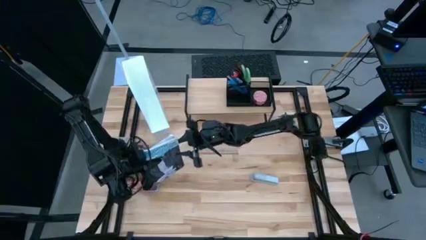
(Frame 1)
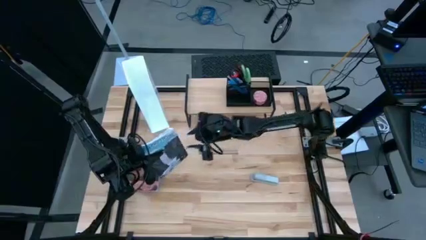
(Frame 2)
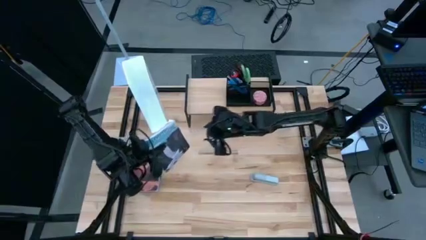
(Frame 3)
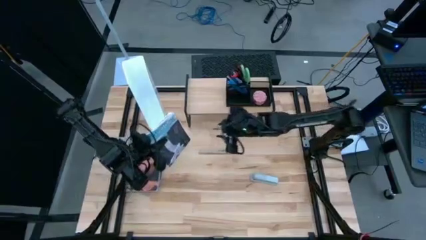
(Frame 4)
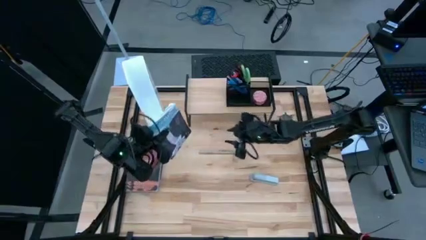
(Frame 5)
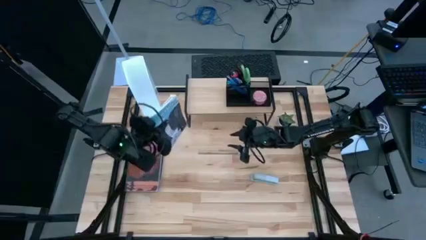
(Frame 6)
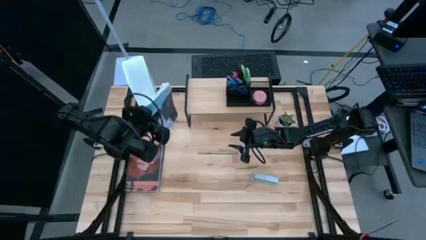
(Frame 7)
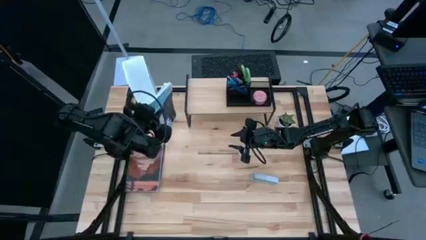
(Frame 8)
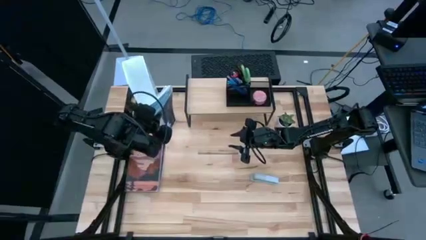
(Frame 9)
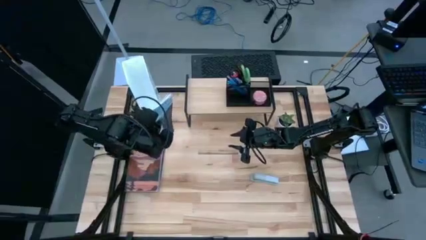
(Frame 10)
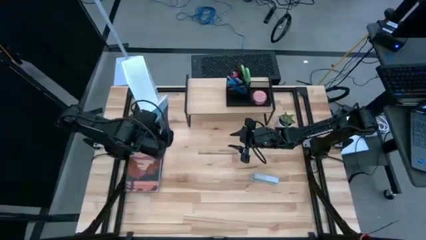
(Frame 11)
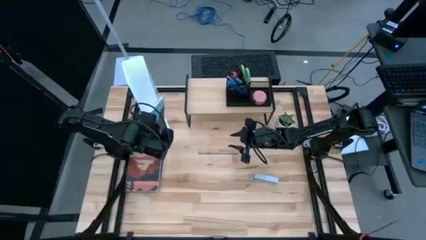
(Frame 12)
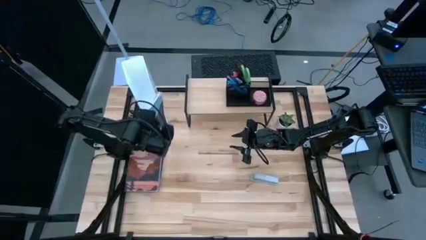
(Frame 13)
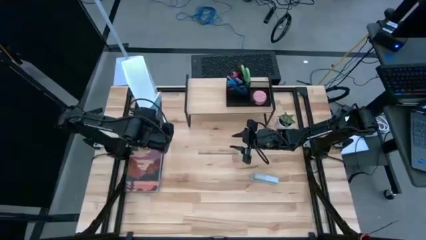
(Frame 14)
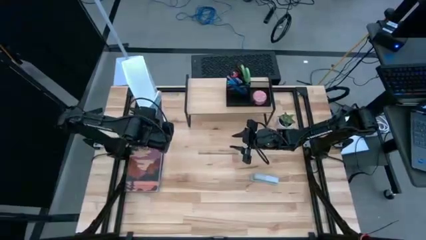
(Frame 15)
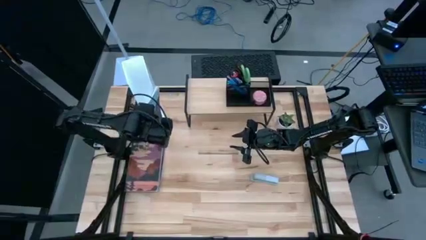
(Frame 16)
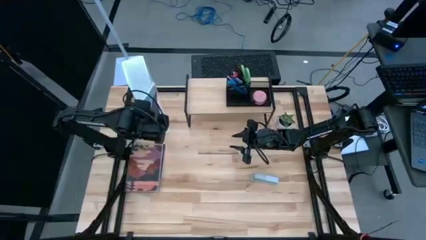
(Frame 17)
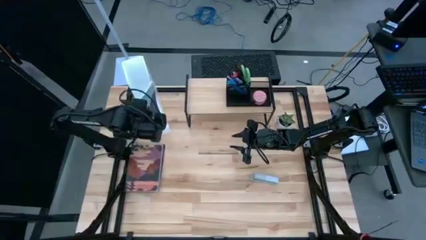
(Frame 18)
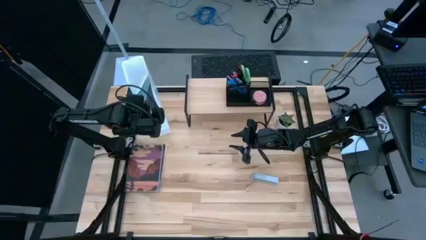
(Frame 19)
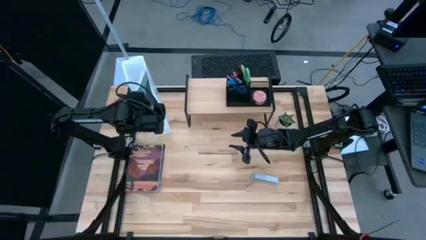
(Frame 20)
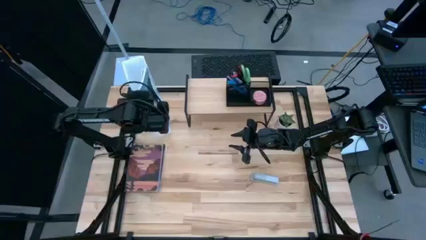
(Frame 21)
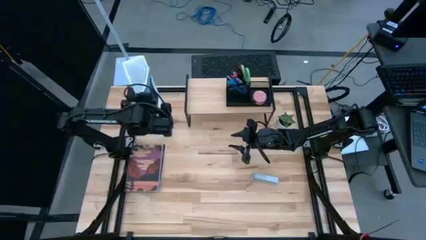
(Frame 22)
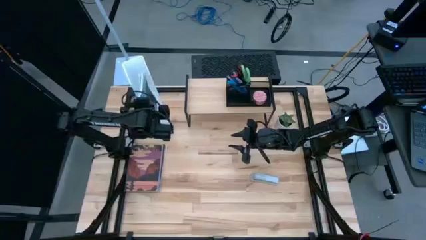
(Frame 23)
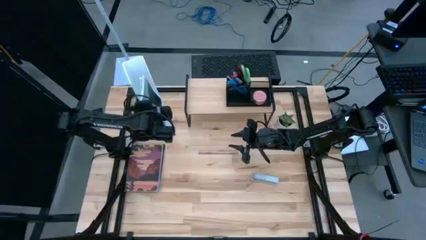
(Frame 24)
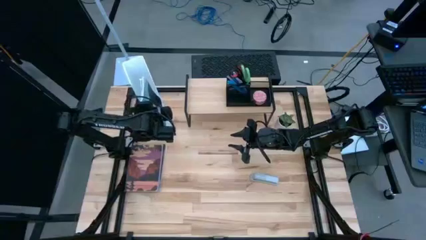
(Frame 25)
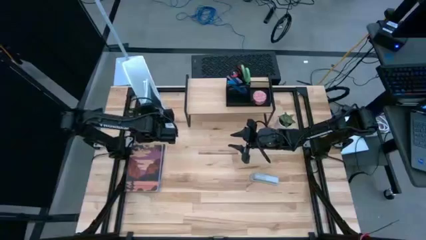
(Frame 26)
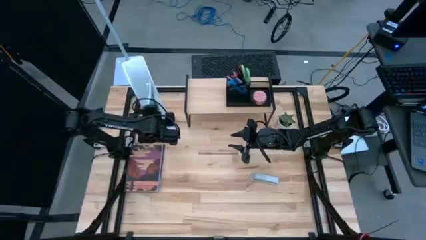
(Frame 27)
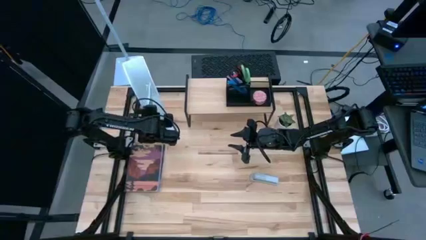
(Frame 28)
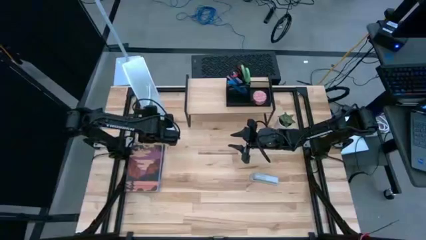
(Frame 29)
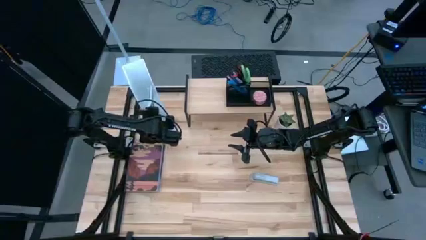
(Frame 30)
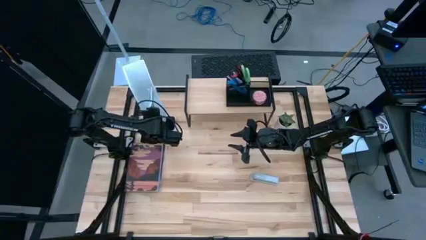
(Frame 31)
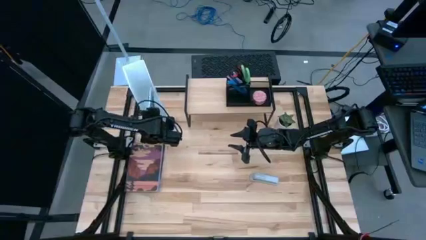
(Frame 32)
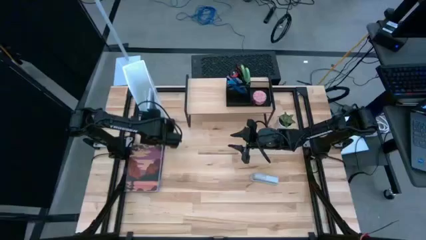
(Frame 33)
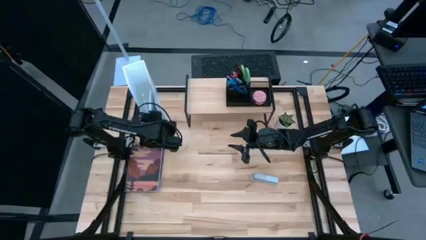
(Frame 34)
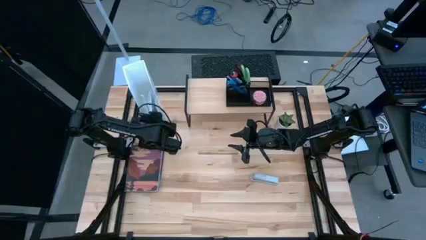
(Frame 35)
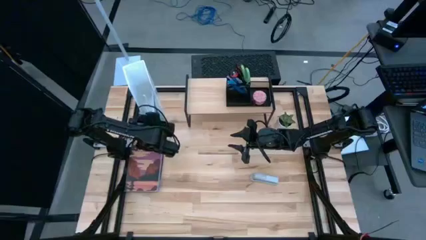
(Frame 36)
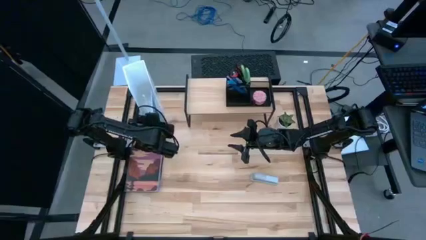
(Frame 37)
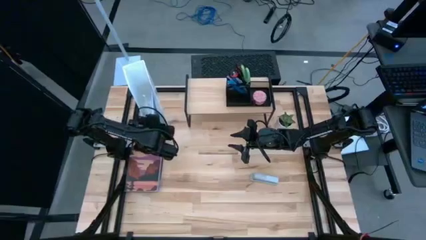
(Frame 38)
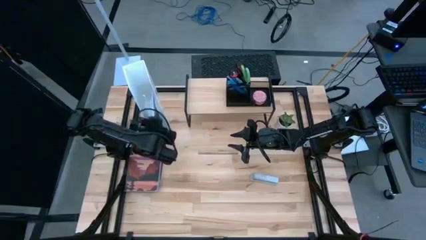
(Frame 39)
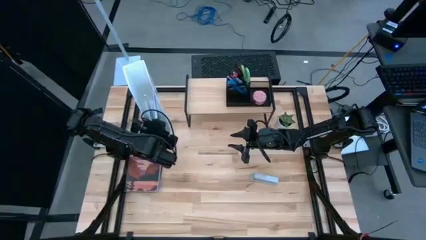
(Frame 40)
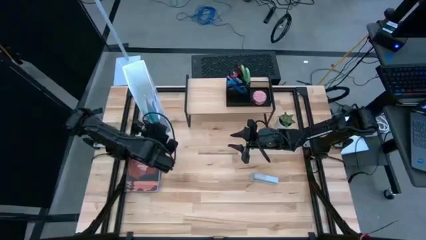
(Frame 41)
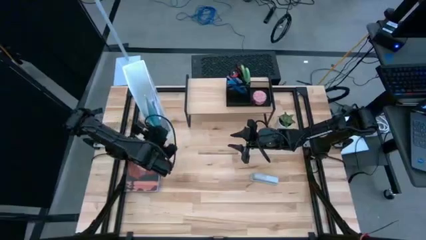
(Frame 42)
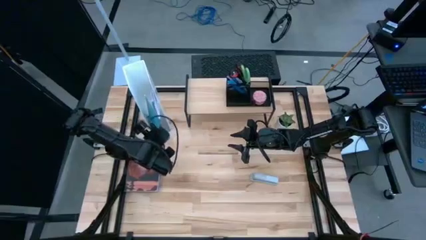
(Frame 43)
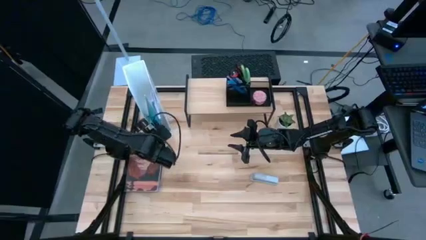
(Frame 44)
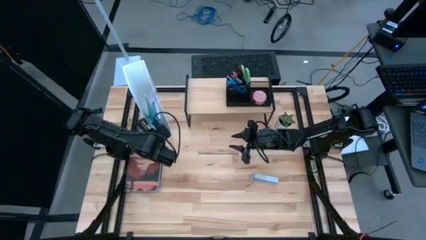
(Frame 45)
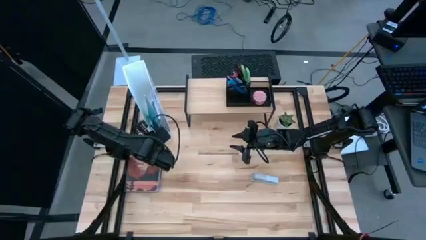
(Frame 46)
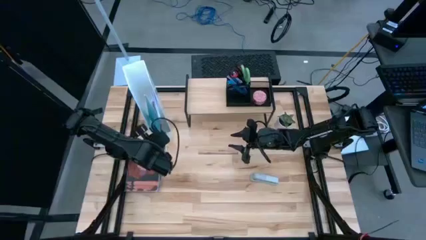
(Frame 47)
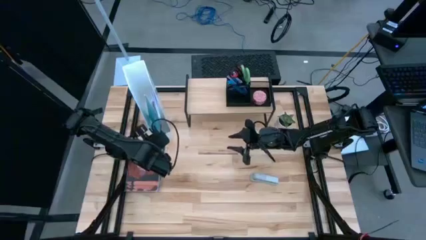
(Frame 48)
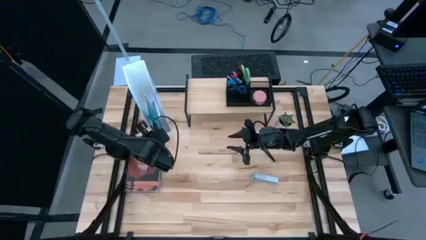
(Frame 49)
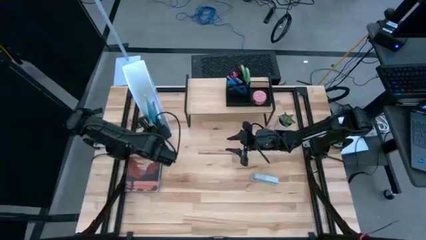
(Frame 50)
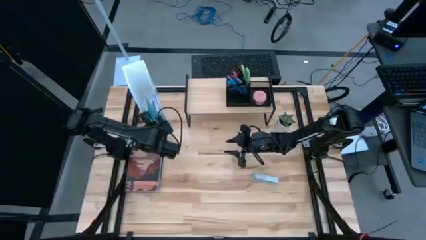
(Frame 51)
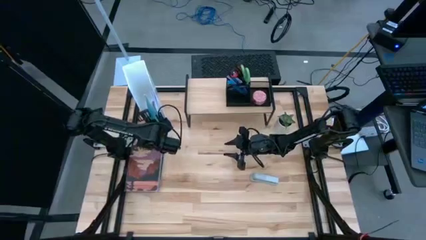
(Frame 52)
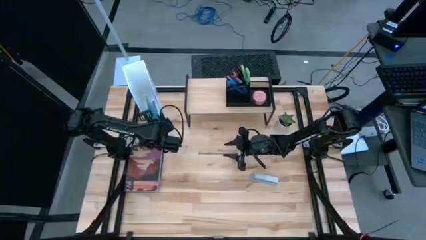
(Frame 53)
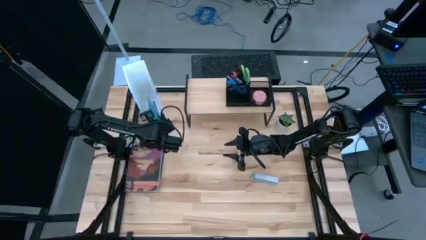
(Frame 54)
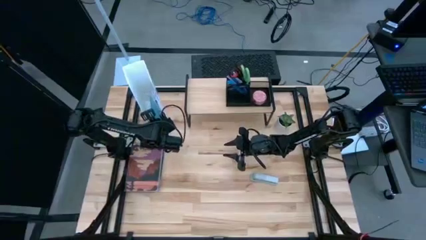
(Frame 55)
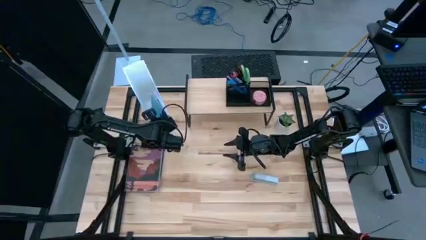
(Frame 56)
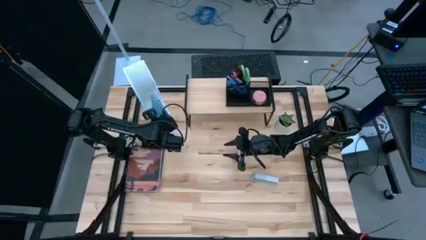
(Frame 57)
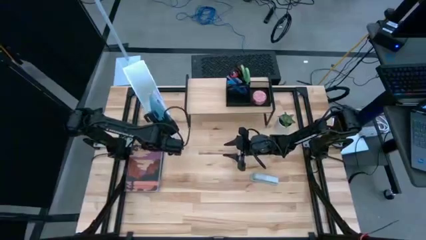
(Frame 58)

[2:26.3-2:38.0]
Task: Stock shelves
Put the blue book into the white bookshelf

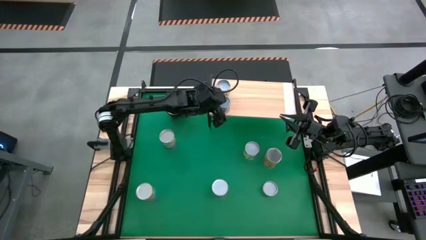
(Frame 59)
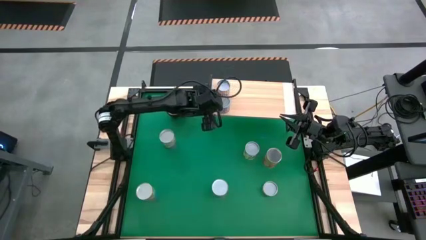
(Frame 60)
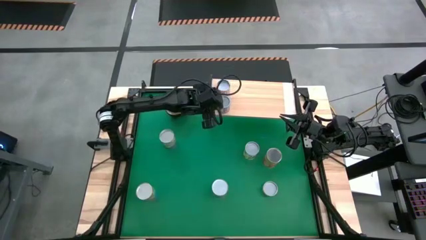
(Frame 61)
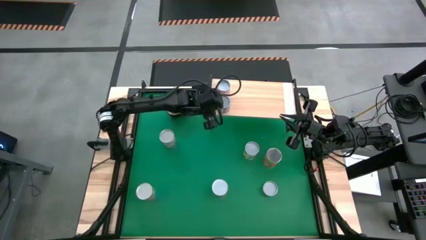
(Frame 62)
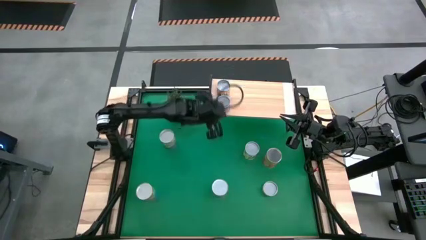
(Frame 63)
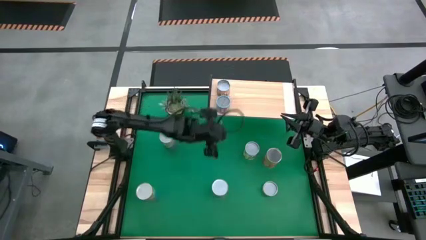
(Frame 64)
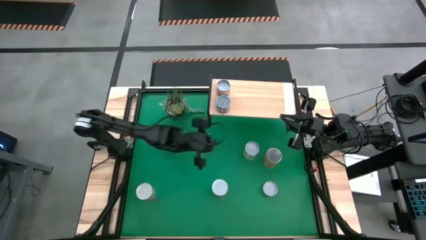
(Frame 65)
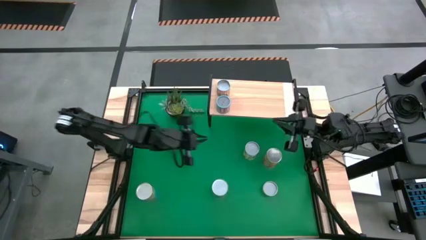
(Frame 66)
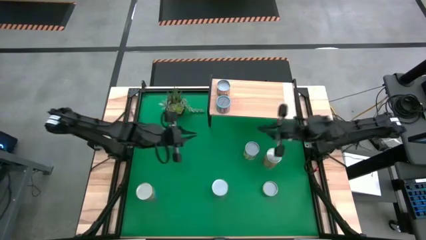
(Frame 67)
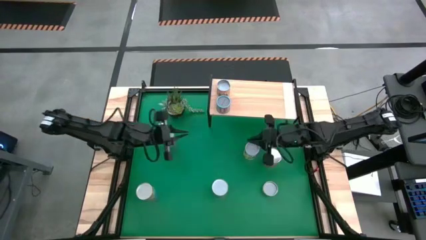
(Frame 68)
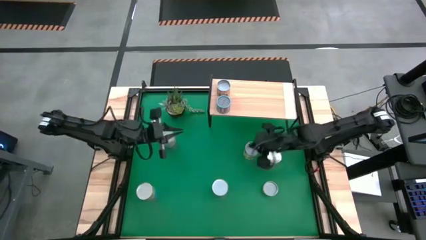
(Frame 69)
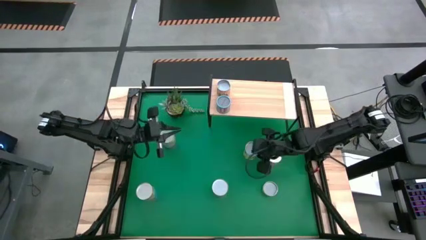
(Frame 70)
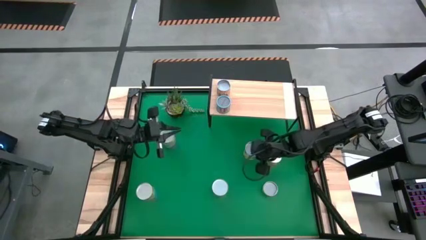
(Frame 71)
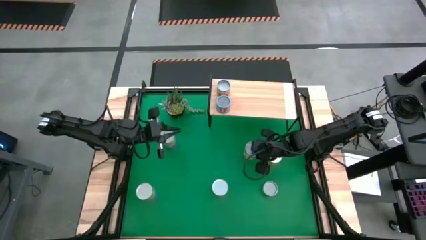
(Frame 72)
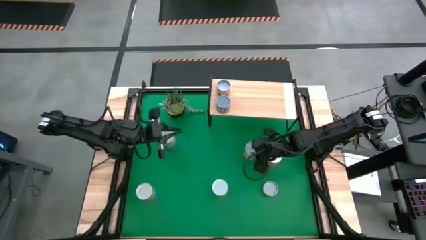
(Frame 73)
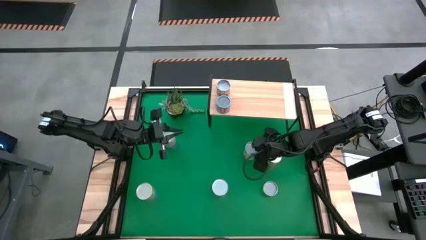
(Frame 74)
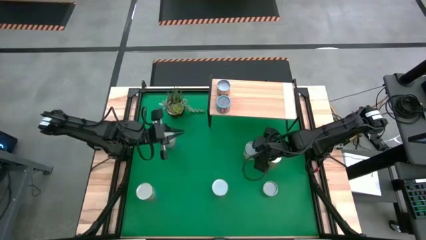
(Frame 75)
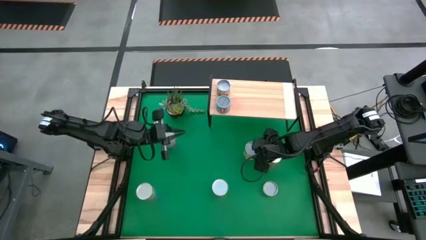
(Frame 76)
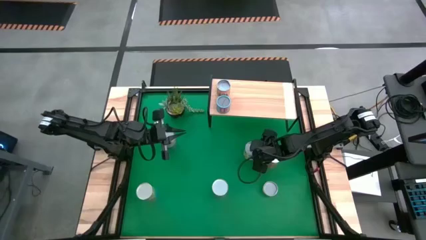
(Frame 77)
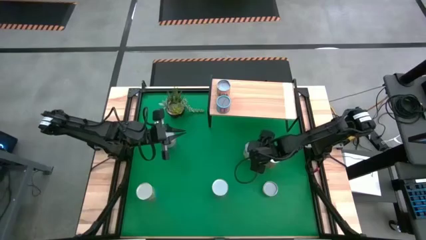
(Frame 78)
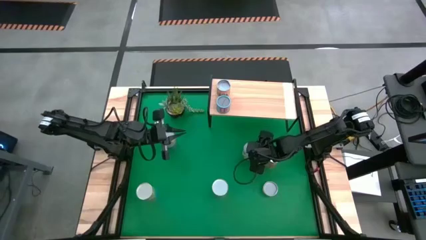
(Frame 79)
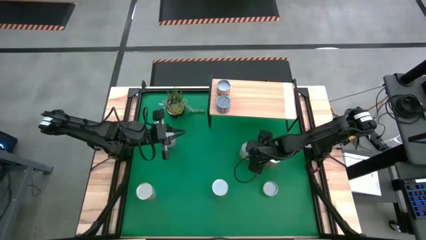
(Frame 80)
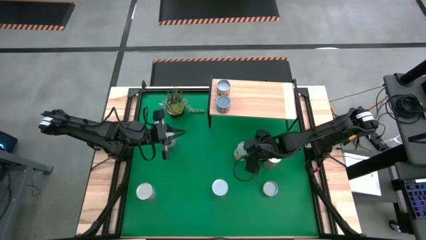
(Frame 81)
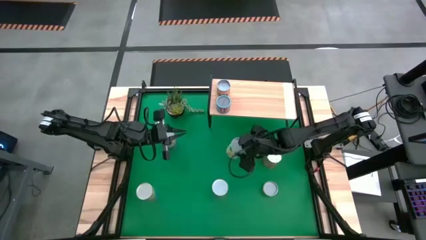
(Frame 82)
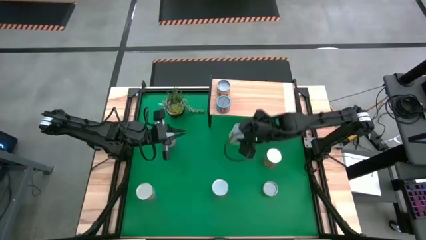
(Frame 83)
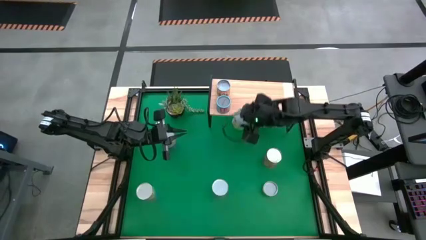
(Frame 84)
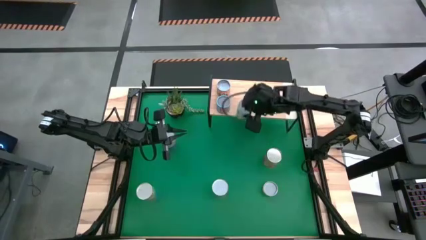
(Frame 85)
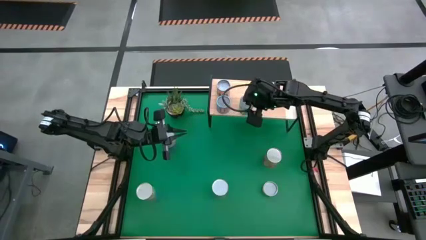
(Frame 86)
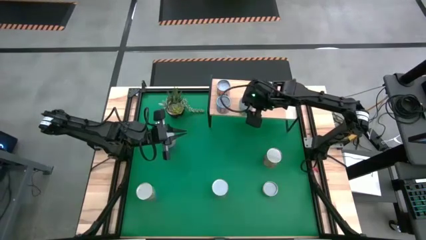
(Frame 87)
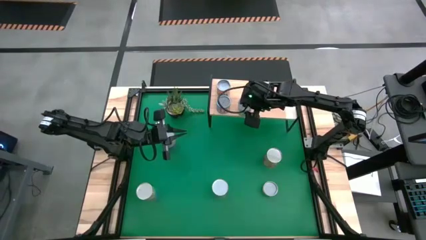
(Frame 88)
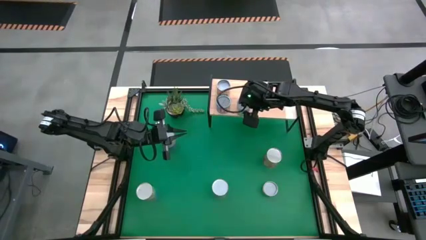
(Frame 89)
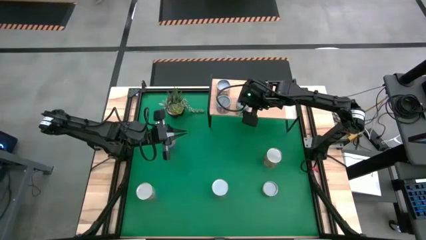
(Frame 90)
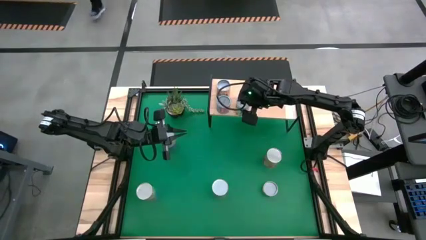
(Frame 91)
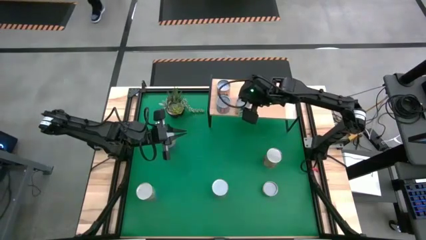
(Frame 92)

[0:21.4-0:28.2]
Task: Pick and place cans onto a shelf
Put the canned mixed fruits on the shelf
